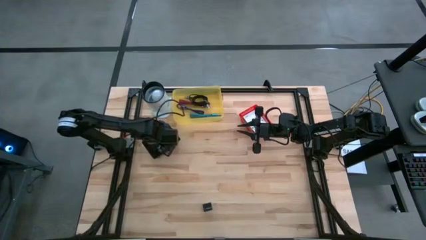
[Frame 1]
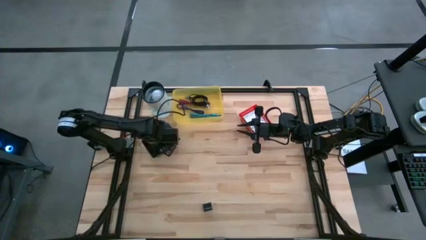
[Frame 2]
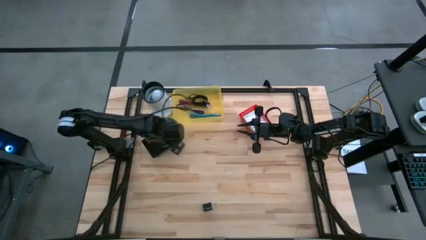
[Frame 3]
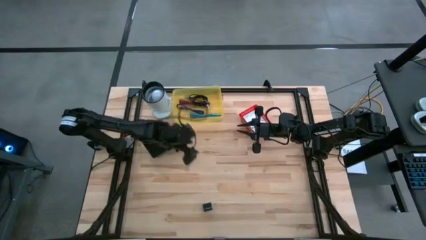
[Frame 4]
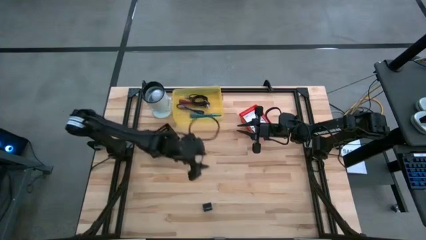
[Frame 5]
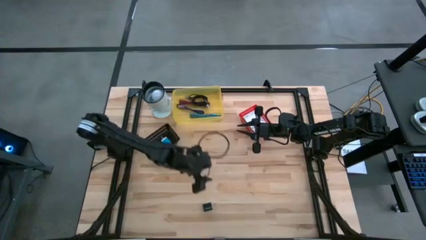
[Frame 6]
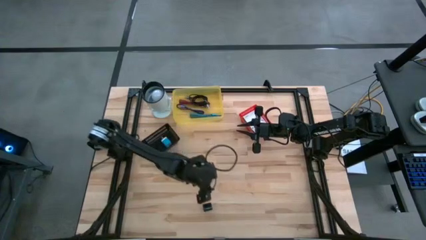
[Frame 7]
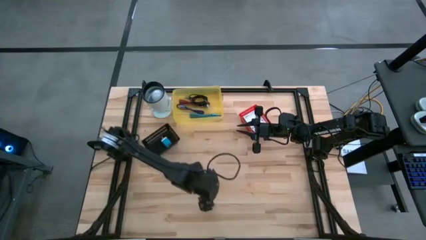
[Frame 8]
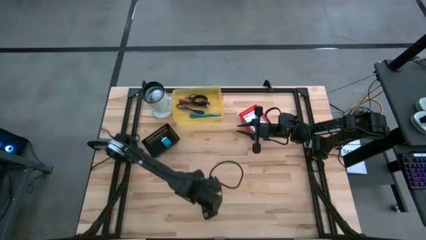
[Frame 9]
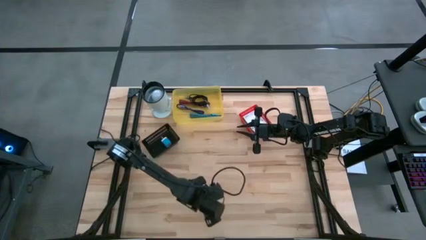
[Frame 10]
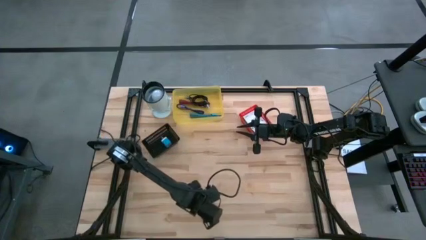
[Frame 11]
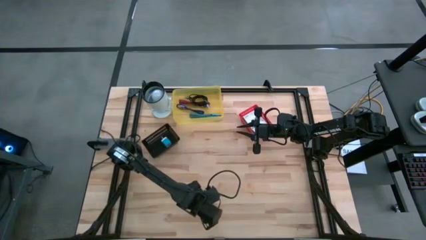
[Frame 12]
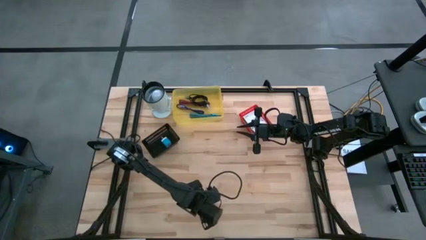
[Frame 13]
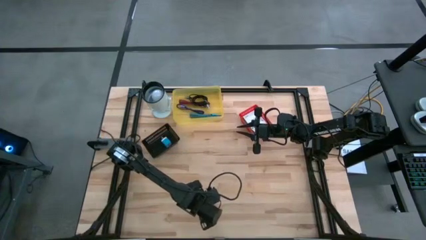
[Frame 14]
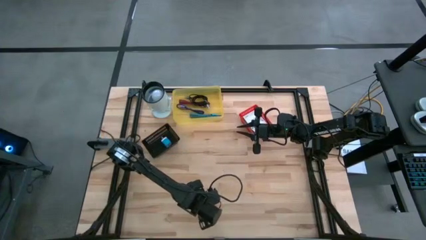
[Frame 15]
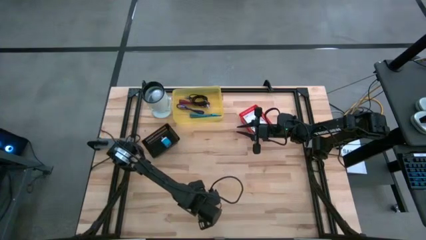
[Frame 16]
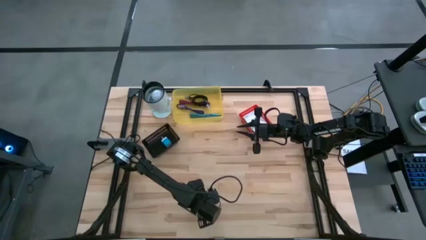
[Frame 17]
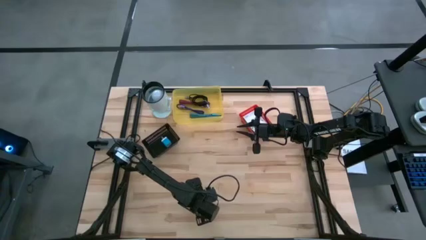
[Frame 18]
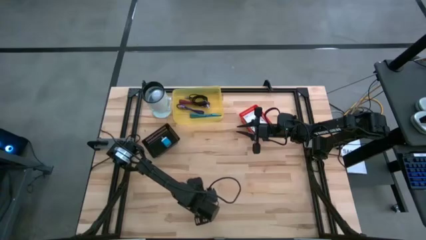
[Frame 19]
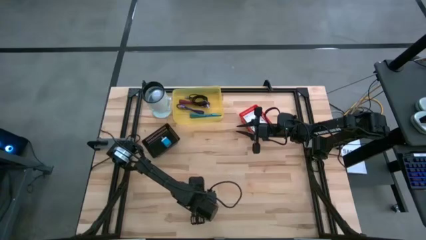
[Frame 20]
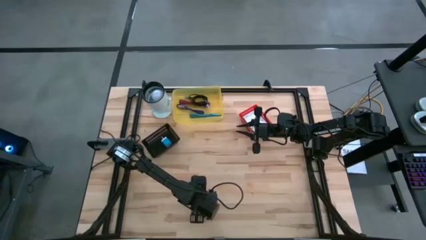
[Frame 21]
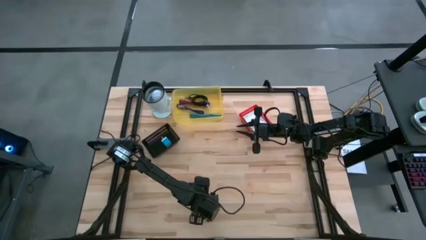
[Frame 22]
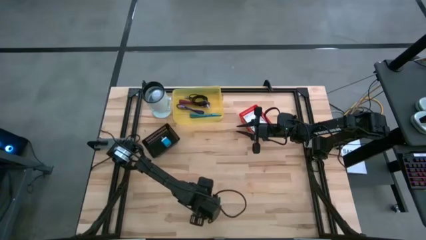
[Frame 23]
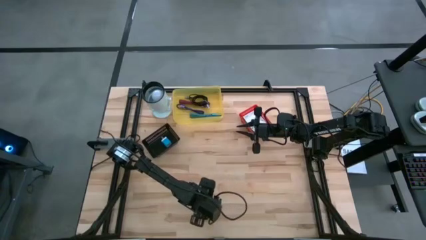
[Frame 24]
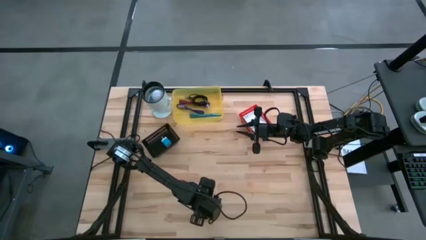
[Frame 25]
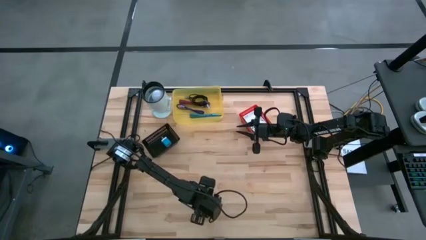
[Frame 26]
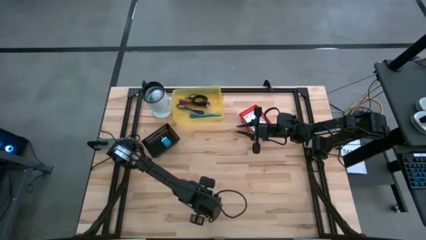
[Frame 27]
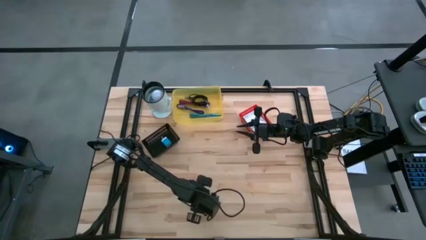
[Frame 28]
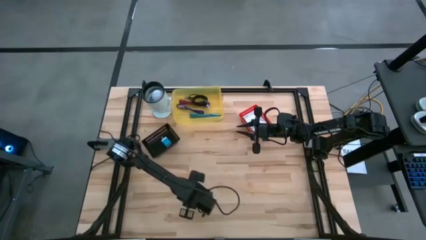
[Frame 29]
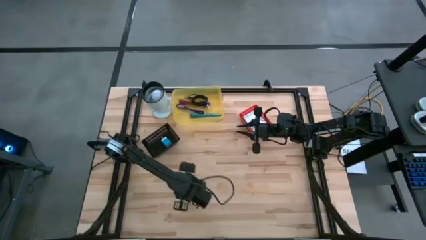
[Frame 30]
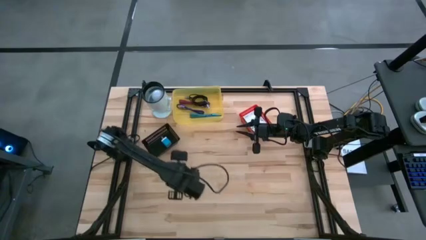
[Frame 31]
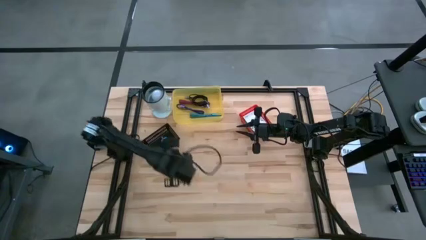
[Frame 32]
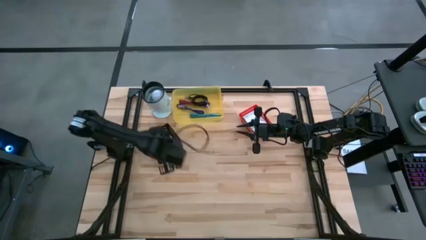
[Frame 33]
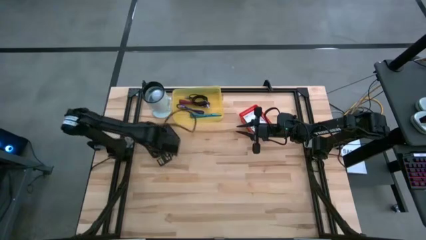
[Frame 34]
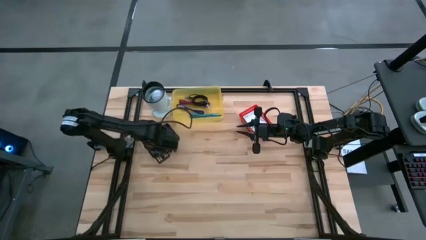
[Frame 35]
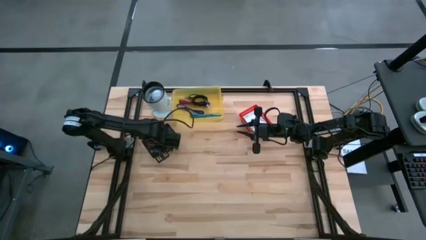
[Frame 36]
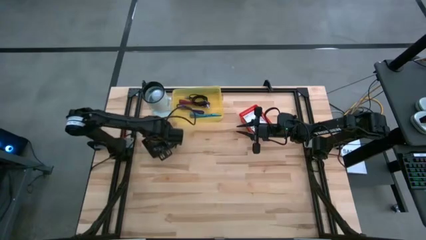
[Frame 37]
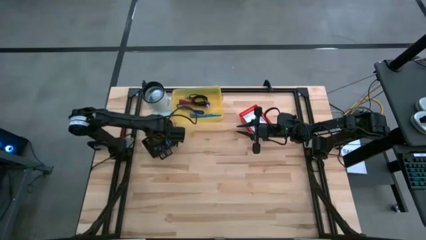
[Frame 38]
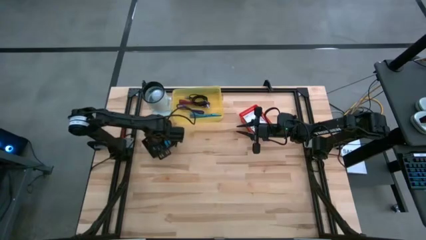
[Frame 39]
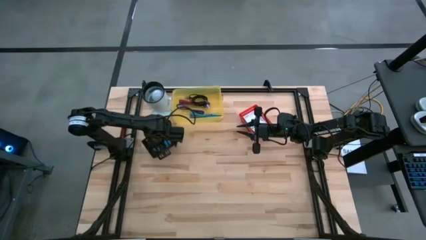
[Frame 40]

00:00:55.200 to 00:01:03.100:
Task: Pick and place items into bin
Put the black charger adapter into the black bin

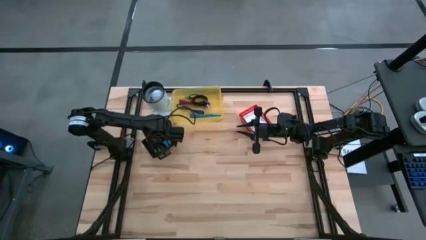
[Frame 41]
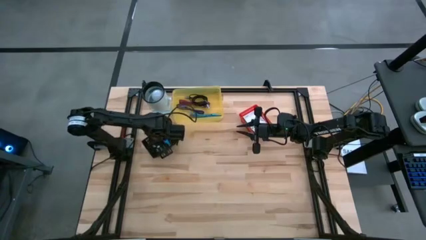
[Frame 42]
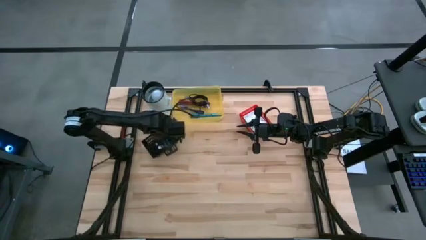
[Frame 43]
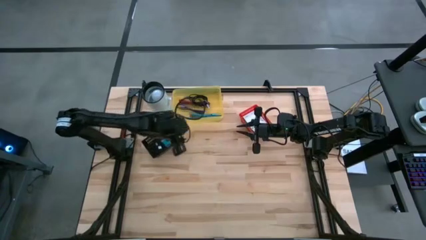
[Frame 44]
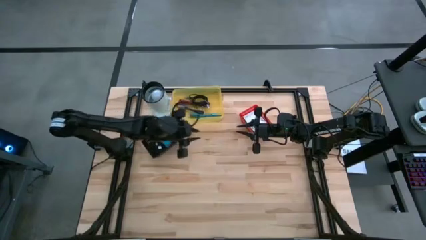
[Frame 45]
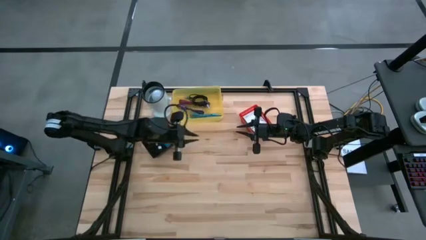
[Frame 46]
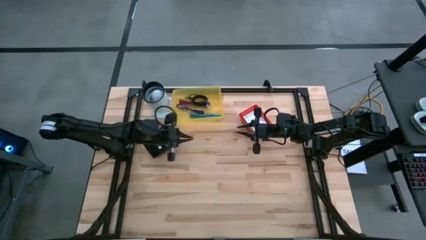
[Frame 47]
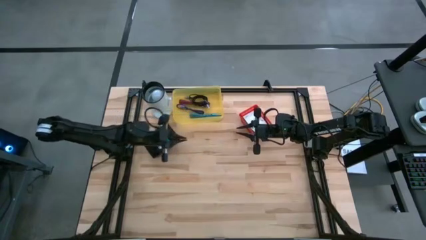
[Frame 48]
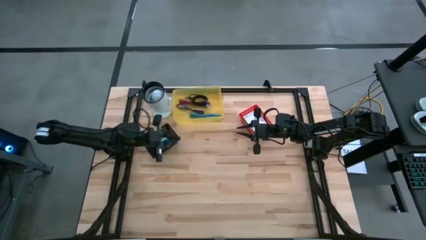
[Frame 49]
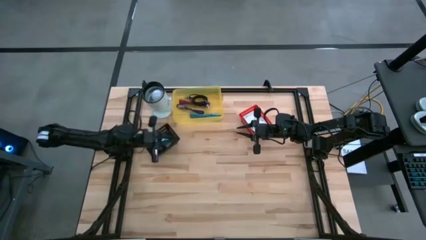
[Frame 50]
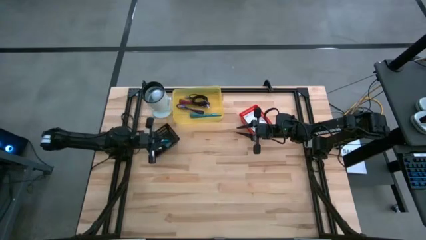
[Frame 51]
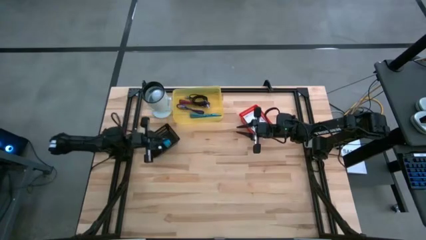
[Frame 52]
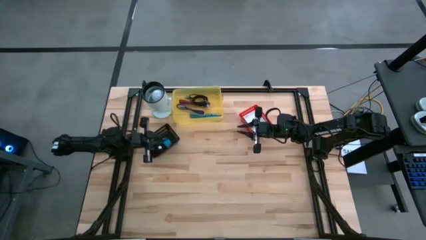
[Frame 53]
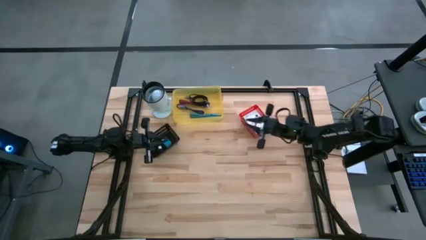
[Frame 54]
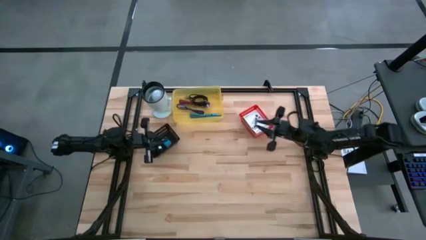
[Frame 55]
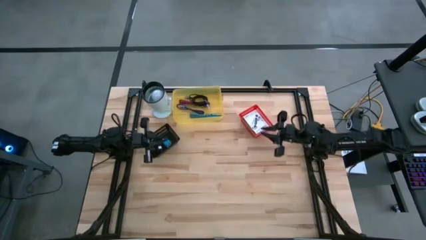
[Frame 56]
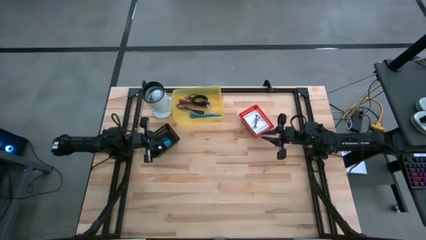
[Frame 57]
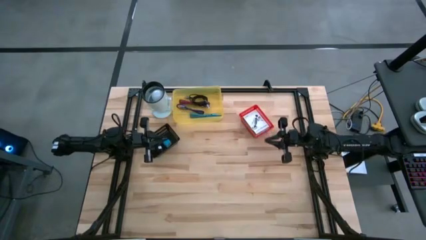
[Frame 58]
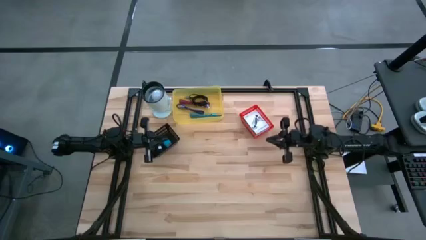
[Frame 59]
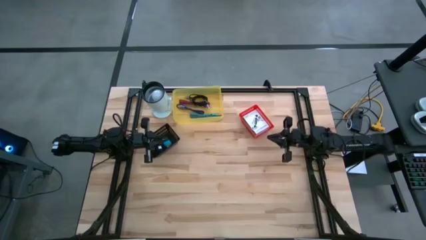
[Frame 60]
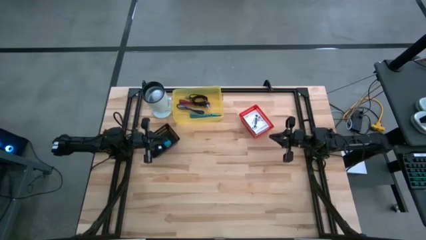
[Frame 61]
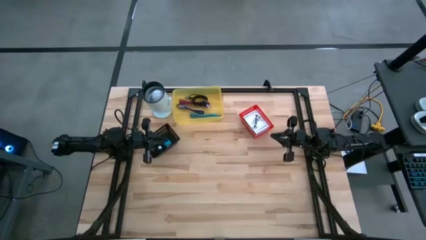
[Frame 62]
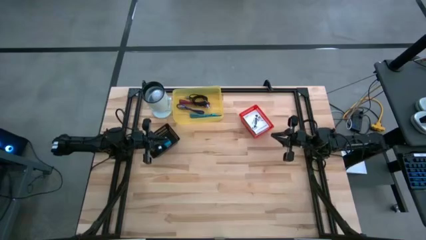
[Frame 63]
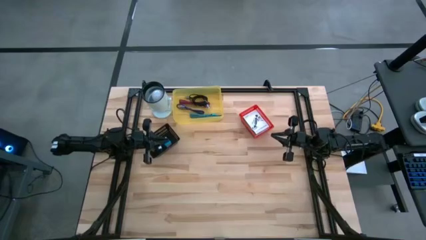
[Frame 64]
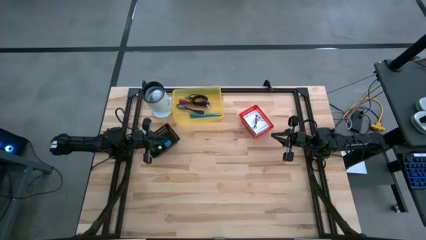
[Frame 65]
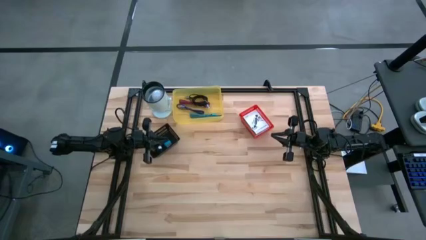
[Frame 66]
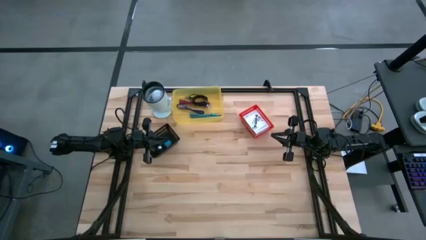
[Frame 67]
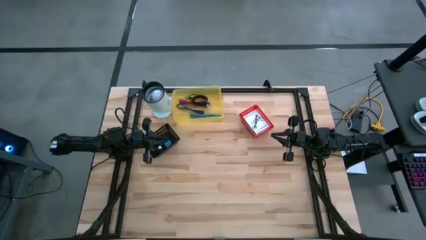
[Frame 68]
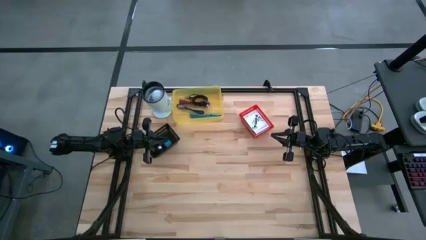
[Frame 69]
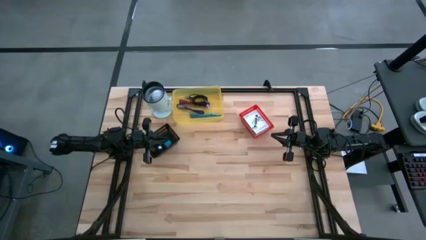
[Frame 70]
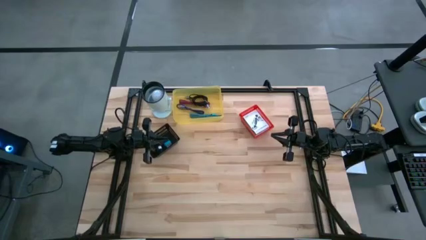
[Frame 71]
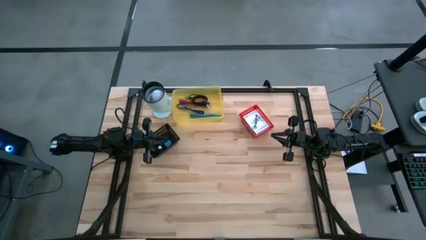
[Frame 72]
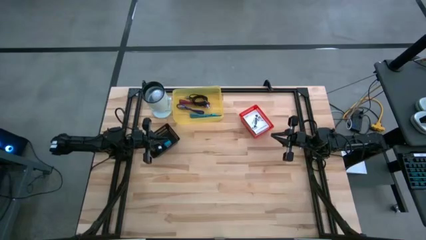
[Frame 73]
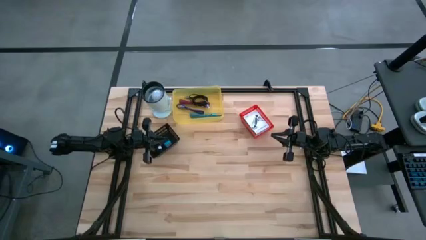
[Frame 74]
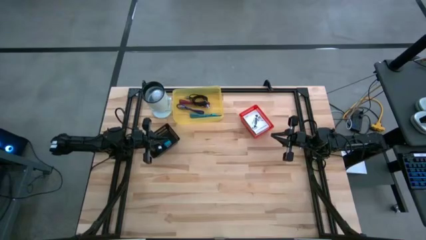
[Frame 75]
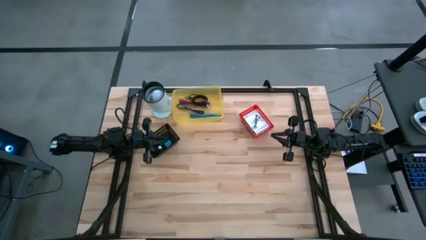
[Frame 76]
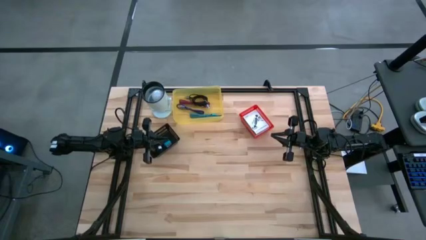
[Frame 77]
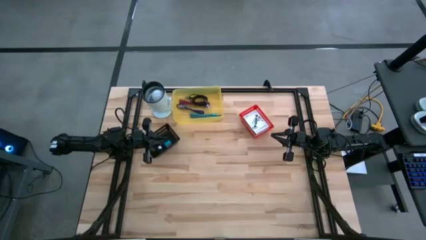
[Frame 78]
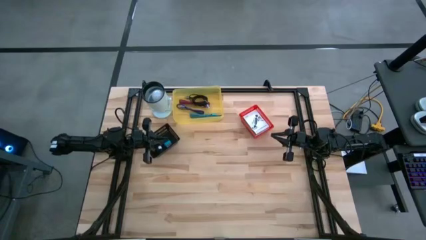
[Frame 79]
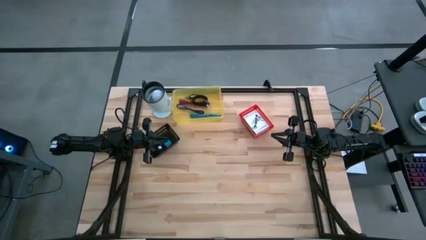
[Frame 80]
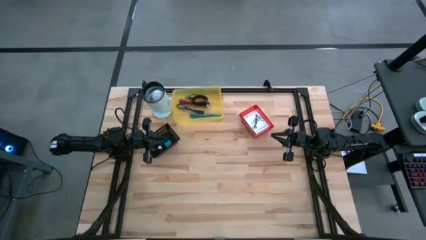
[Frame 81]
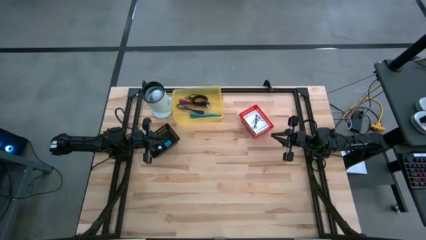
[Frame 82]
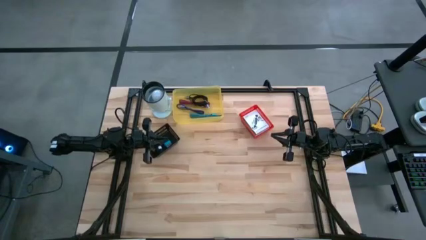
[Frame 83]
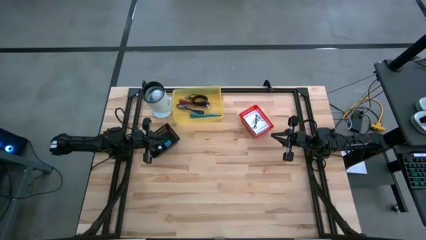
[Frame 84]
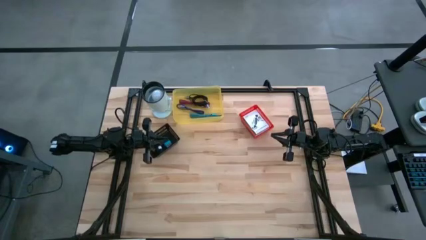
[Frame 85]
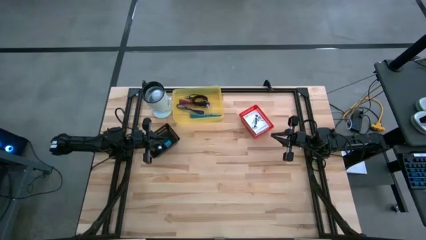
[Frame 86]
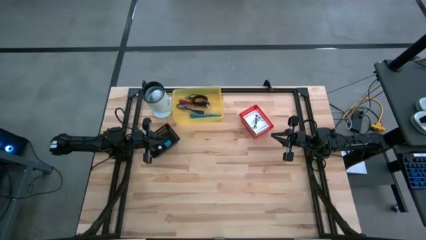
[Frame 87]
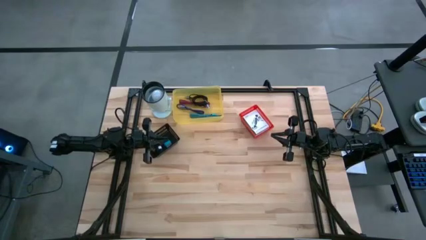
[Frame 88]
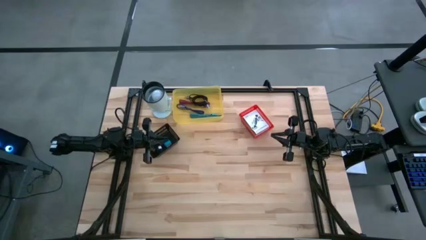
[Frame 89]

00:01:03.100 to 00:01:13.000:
Return to Home Position
